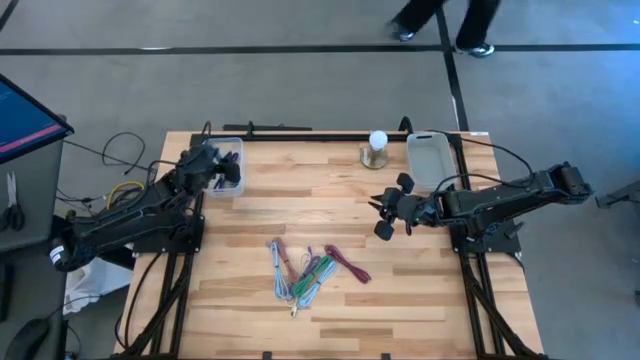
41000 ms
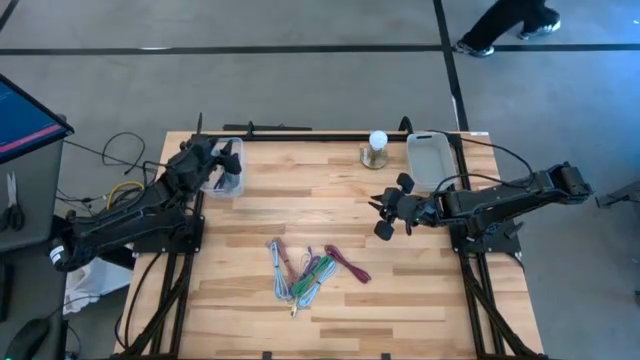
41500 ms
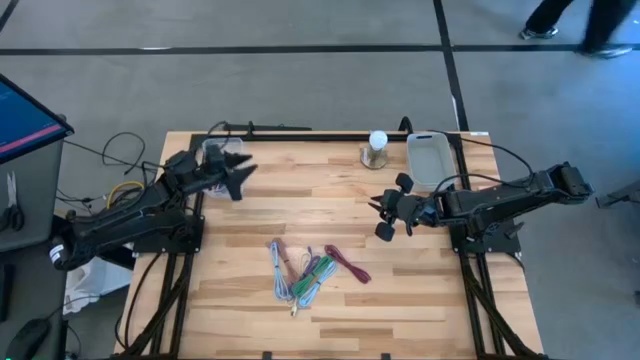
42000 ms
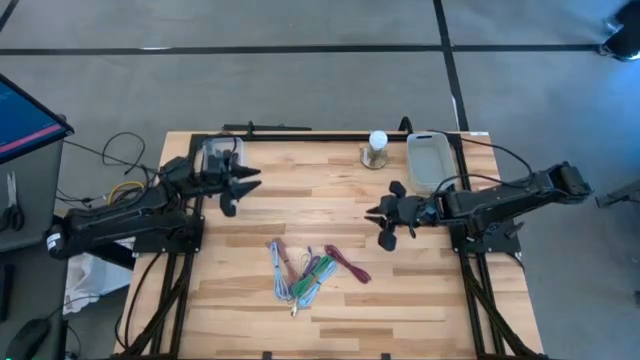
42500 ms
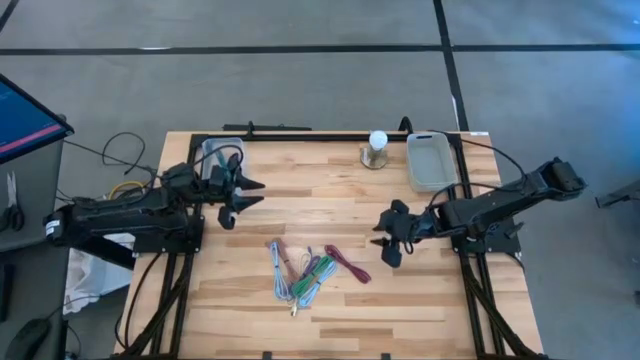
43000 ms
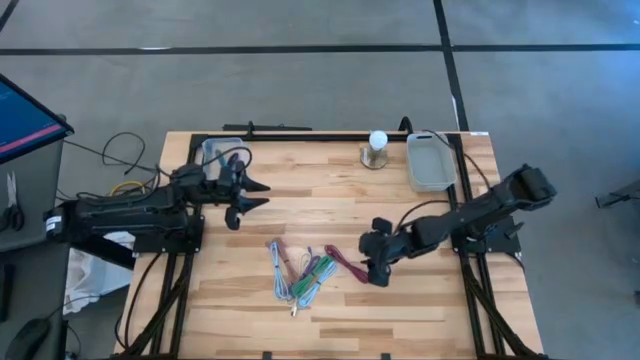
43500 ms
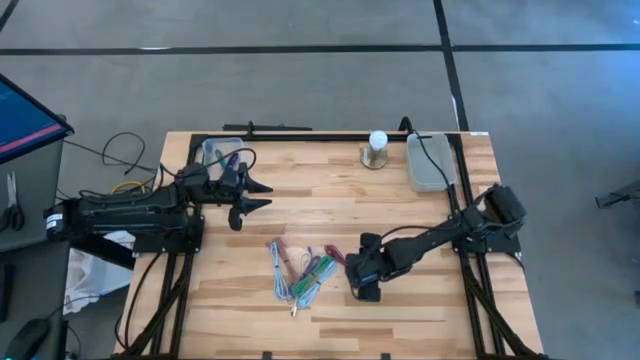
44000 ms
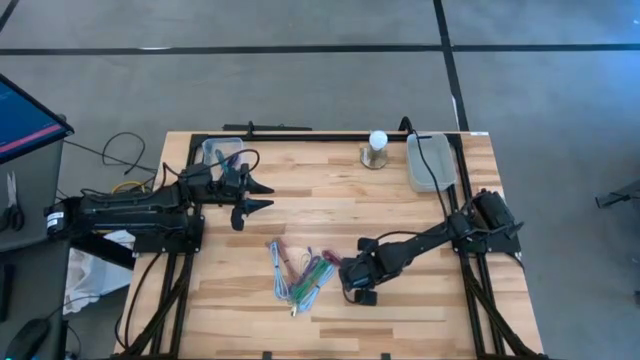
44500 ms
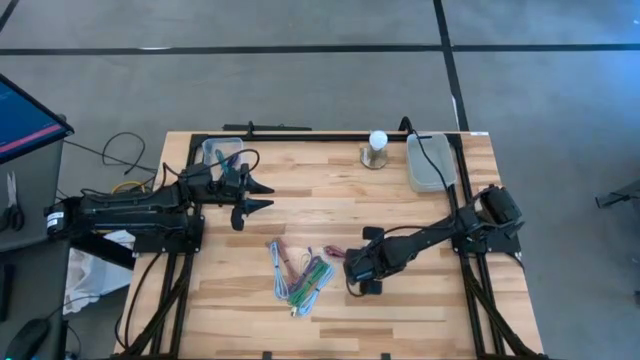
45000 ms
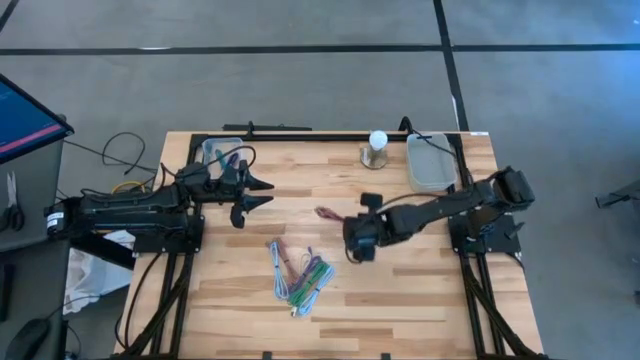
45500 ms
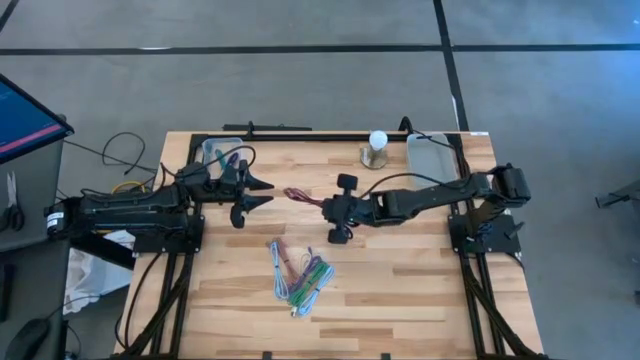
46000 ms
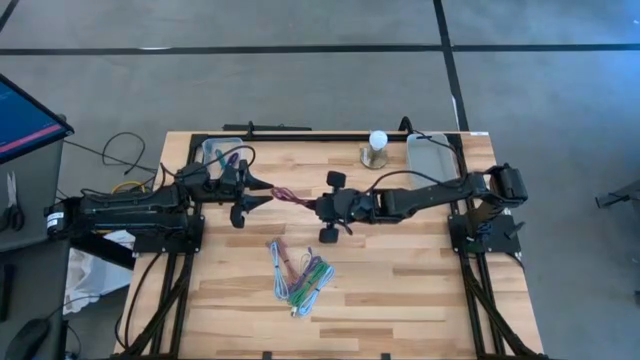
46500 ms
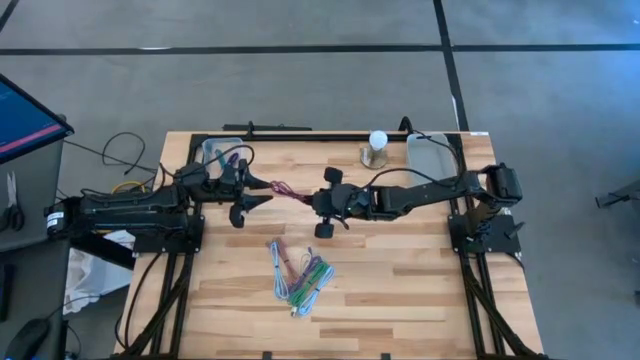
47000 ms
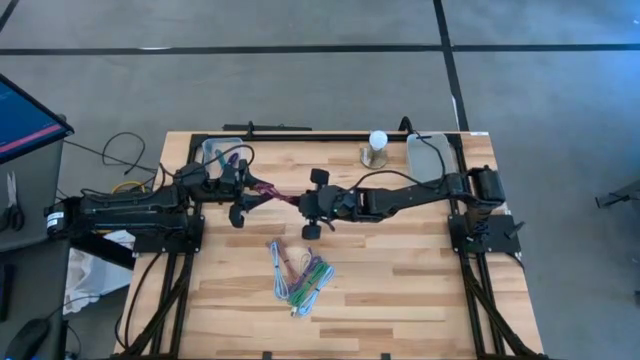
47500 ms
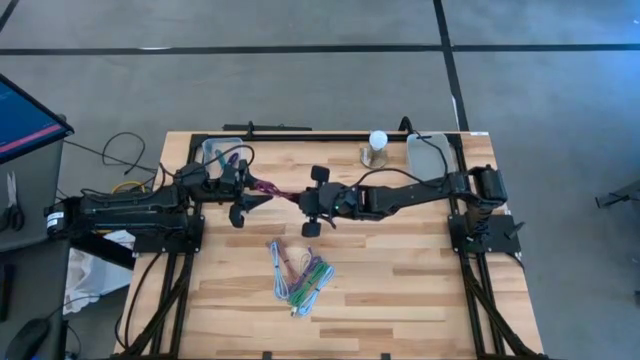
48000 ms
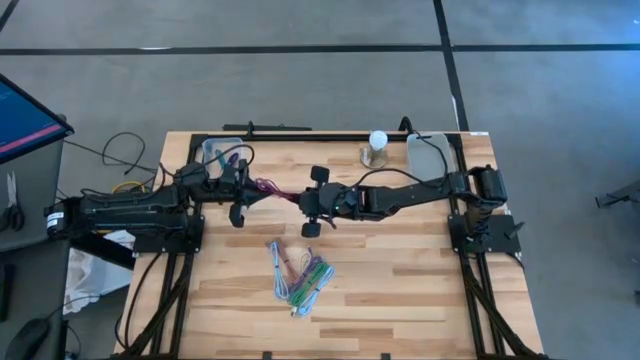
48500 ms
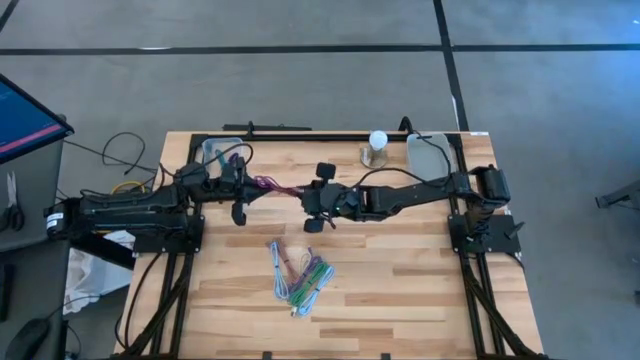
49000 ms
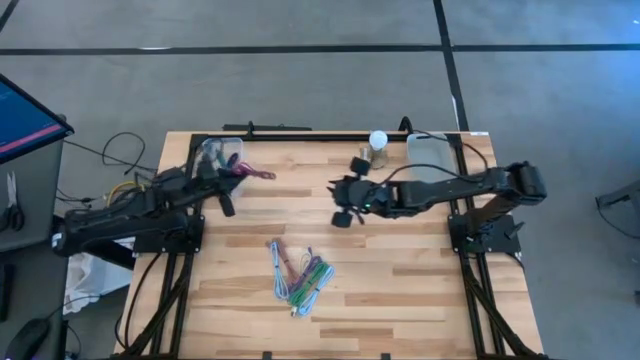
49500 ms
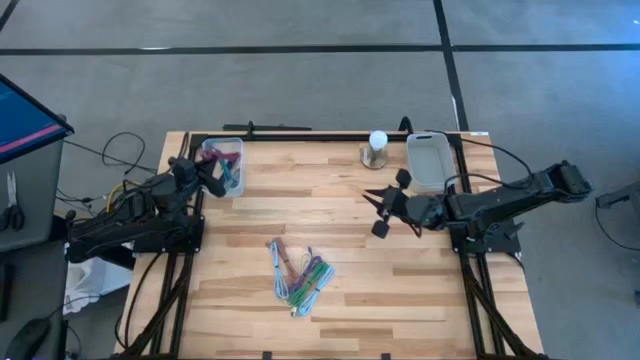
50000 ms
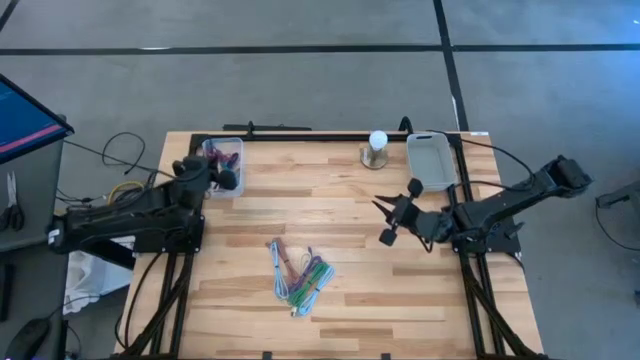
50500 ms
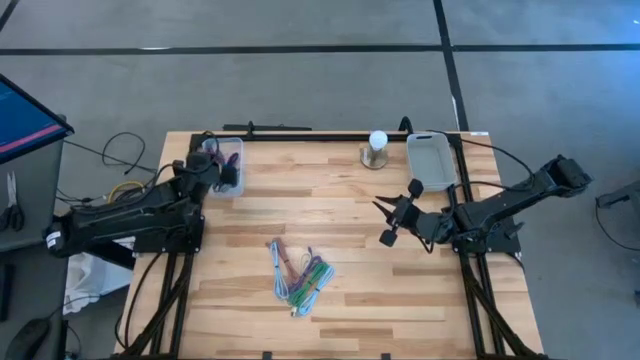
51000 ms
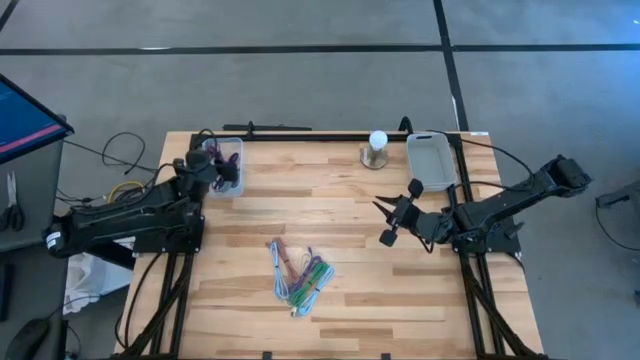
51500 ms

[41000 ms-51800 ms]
Task: Pick & Place USB Port
Put the pink and black charger cable into the transparent bin

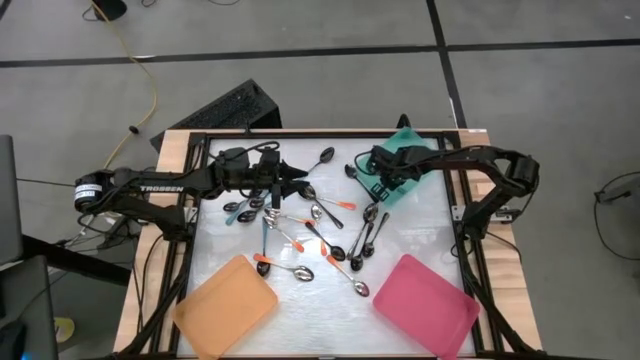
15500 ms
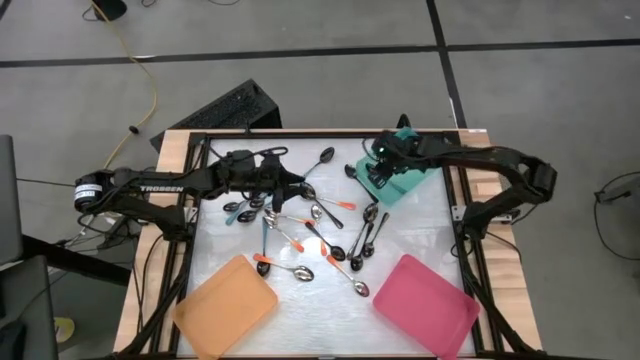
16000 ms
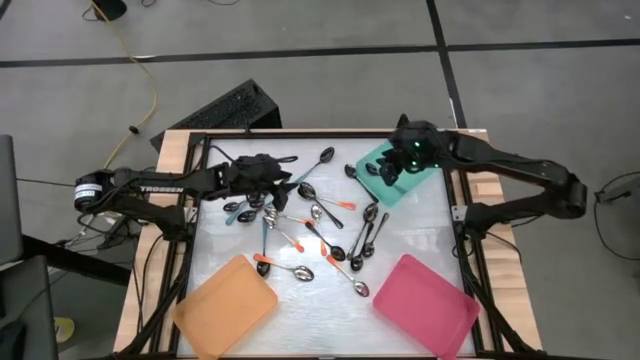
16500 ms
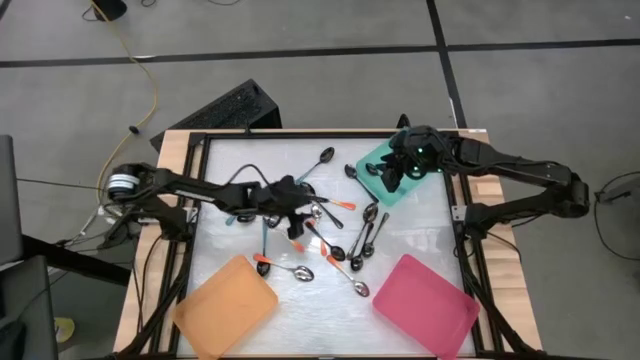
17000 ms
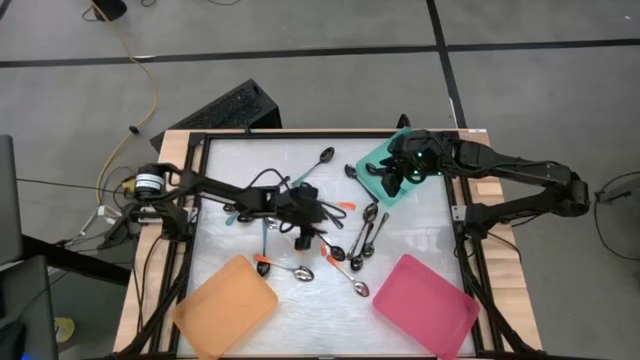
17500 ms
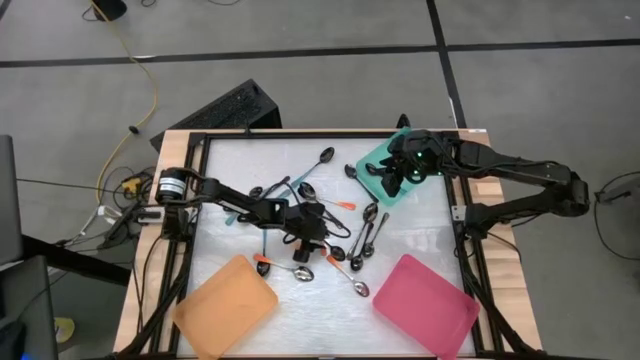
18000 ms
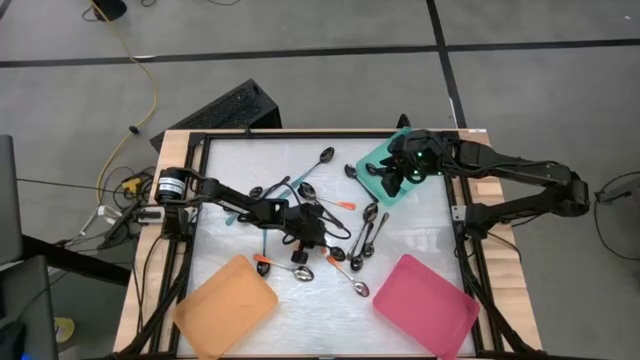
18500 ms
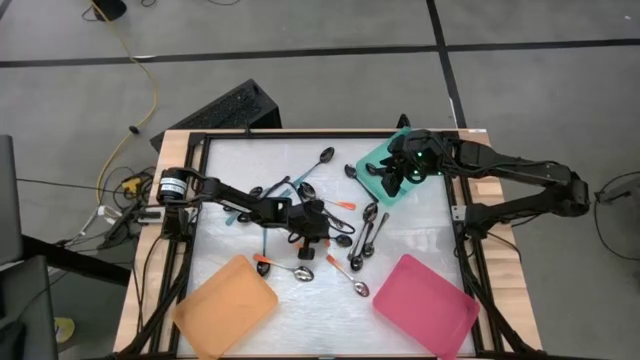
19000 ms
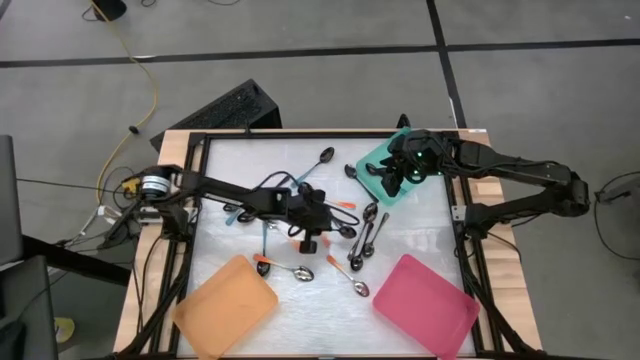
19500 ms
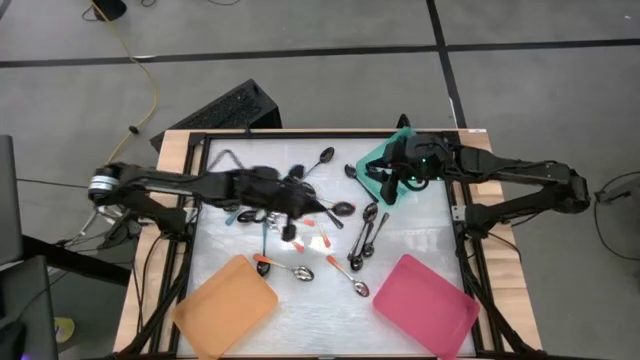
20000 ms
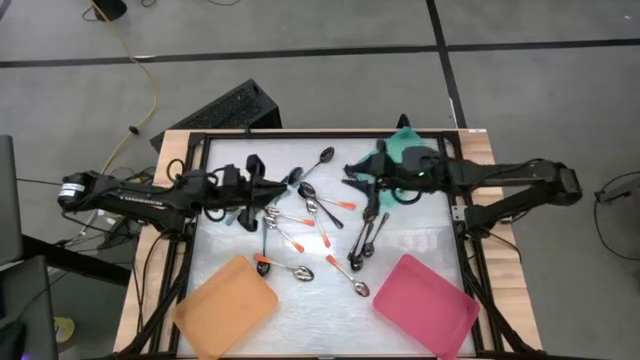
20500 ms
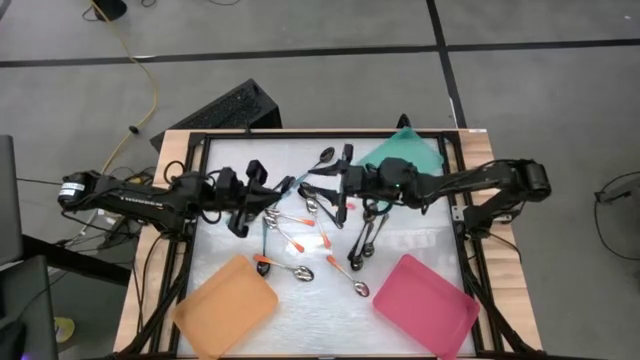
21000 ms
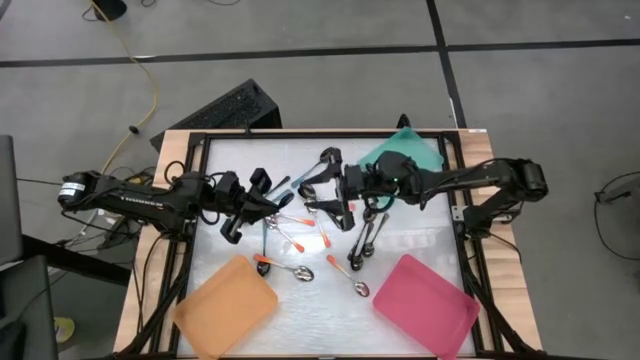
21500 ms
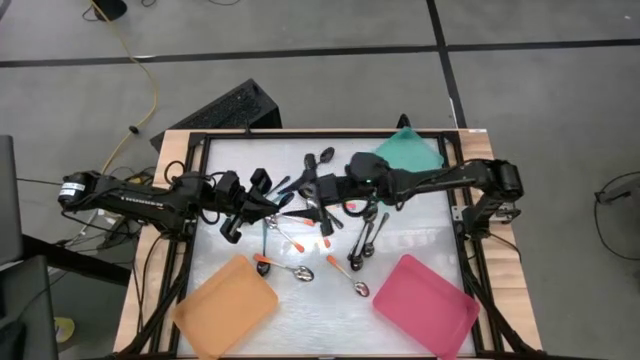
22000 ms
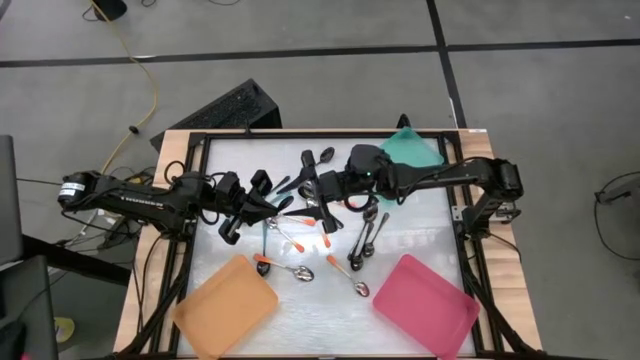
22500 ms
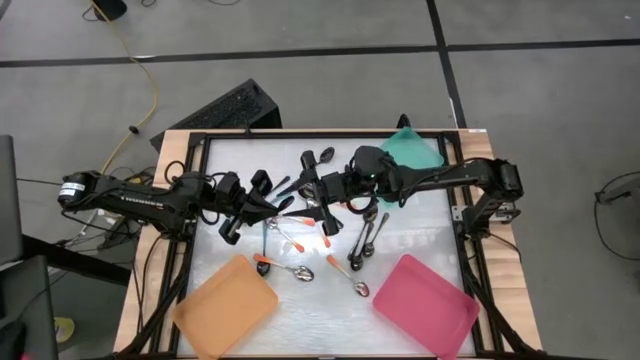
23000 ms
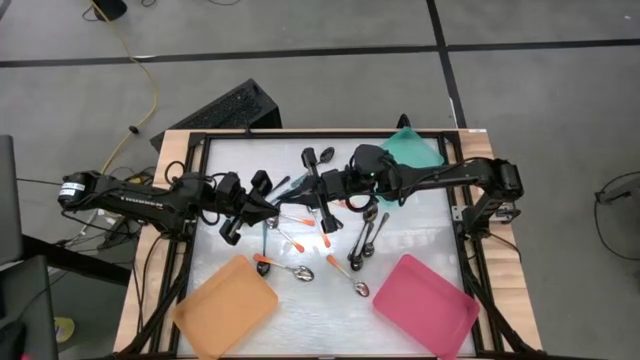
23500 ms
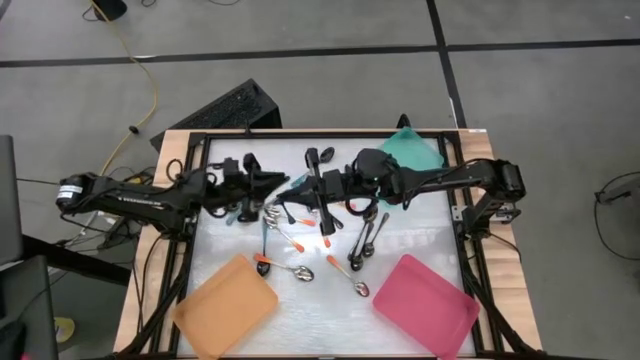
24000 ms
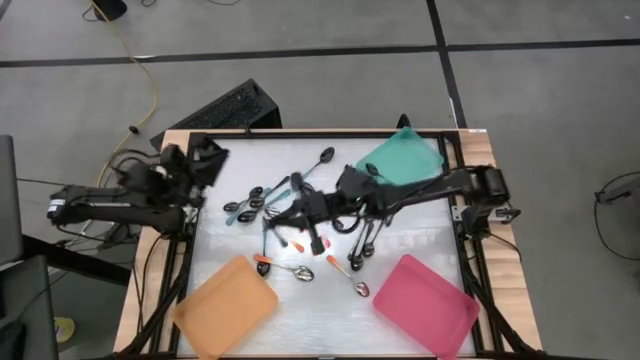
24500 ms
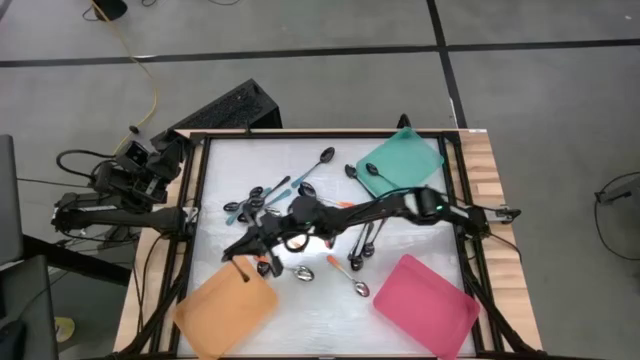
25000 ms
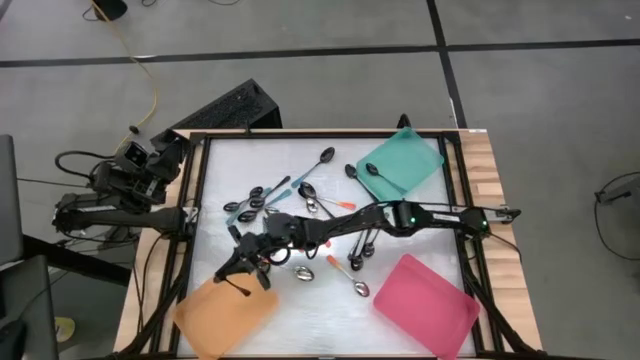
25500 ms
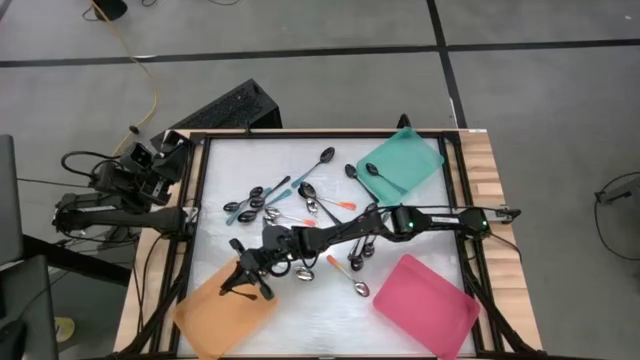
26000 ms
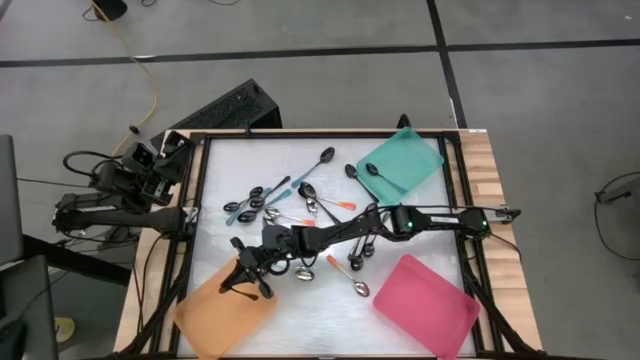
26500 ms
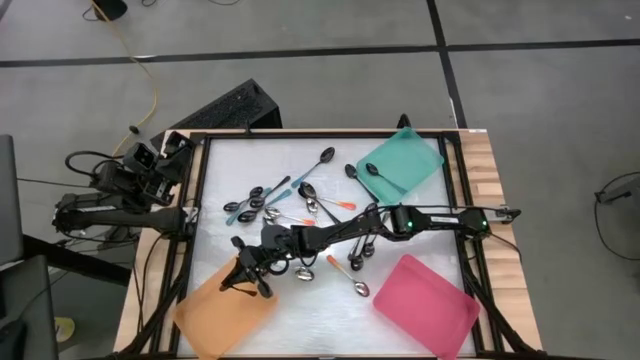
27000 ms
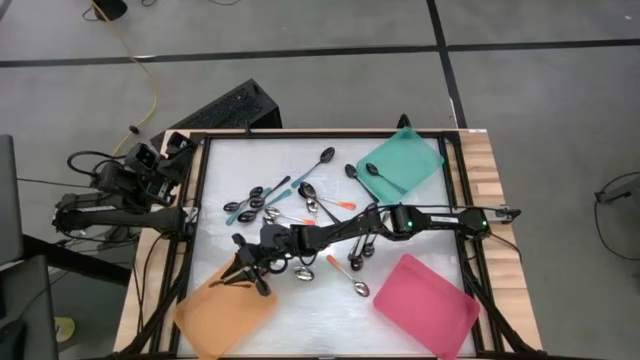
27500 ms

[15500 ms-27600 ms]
Task: Sort silverware by color (type)
Put the black spoon into the orange bin
